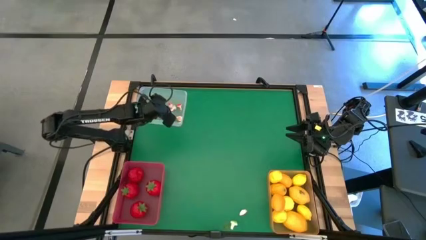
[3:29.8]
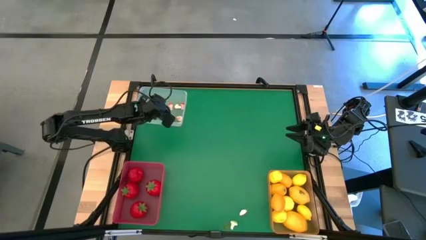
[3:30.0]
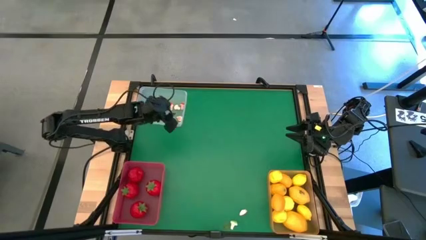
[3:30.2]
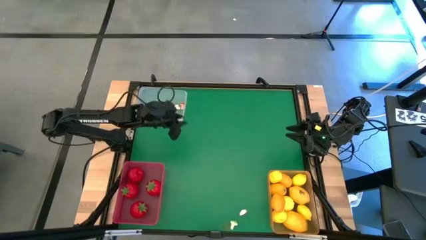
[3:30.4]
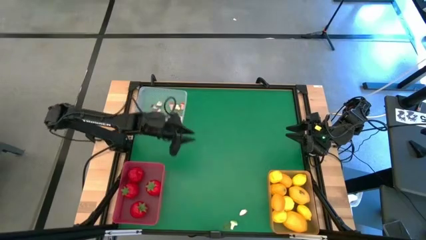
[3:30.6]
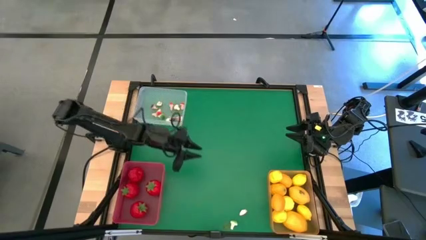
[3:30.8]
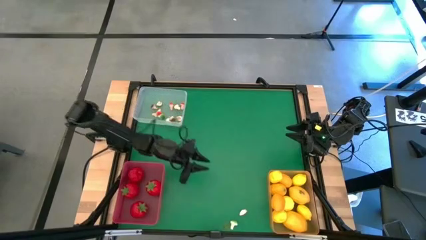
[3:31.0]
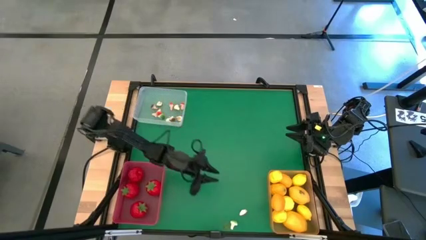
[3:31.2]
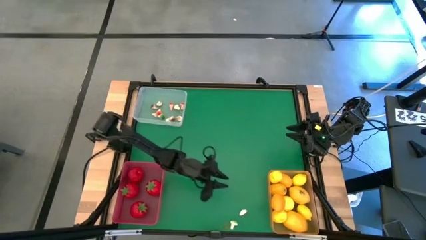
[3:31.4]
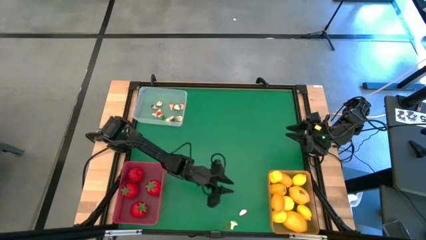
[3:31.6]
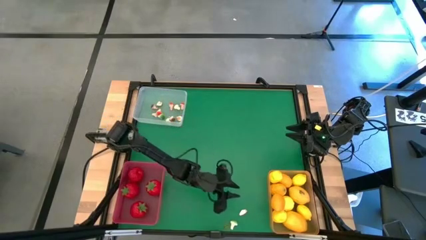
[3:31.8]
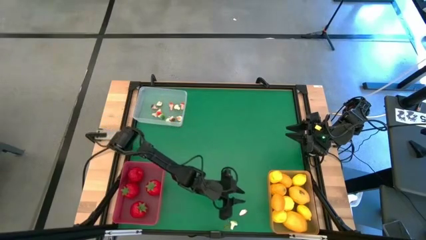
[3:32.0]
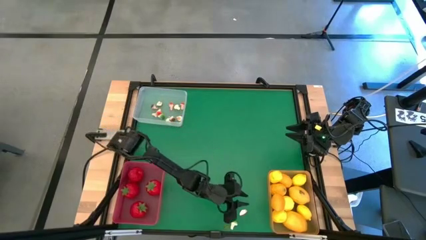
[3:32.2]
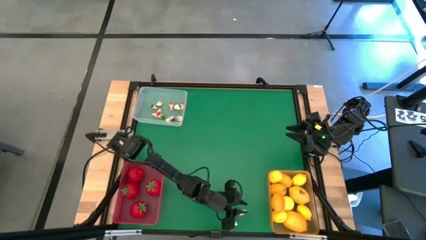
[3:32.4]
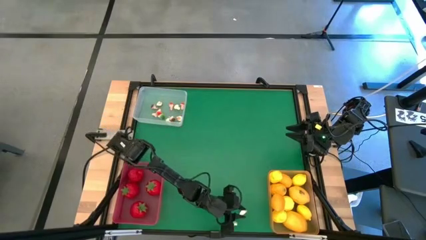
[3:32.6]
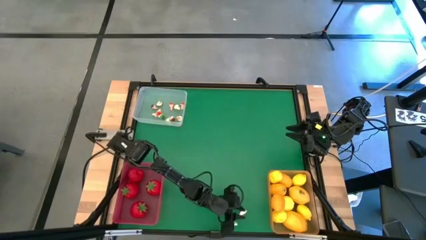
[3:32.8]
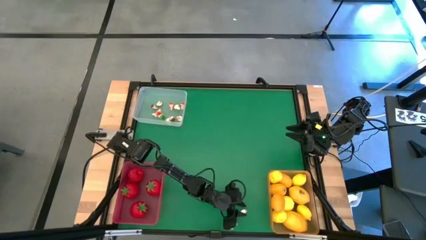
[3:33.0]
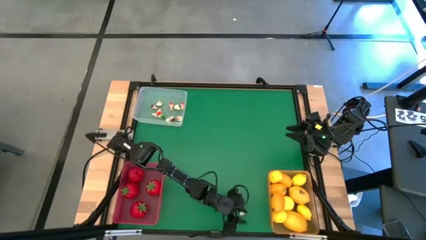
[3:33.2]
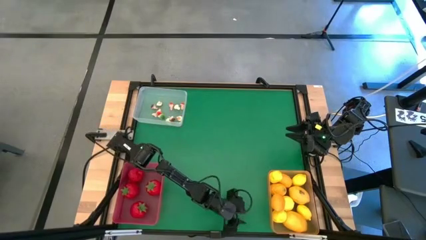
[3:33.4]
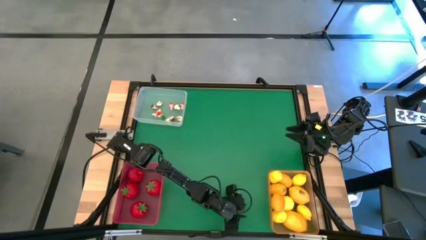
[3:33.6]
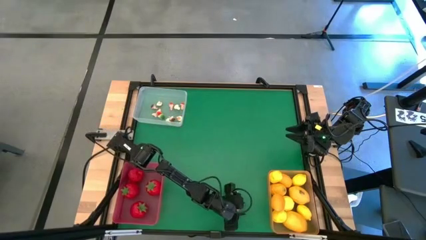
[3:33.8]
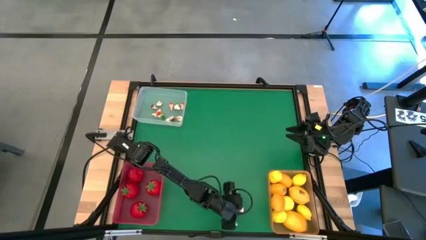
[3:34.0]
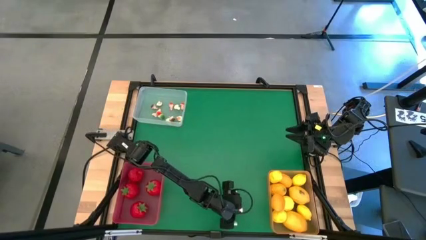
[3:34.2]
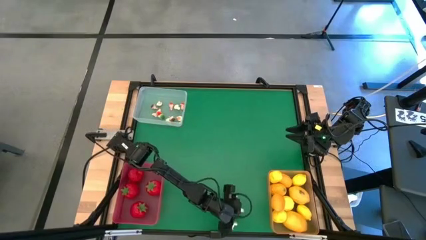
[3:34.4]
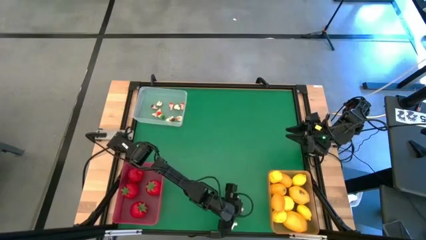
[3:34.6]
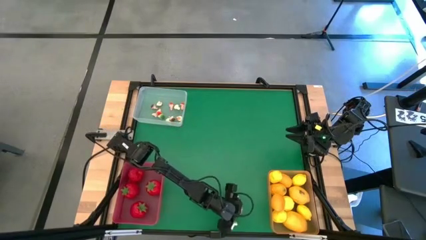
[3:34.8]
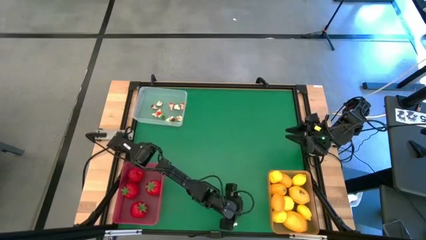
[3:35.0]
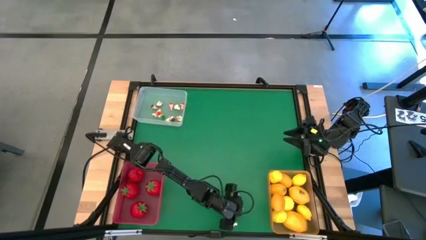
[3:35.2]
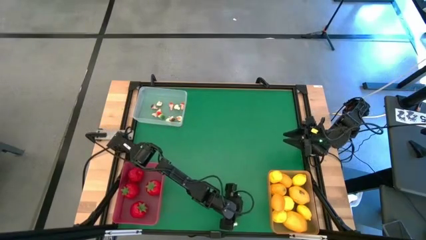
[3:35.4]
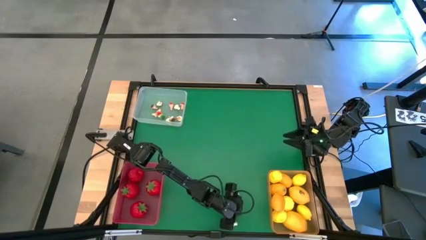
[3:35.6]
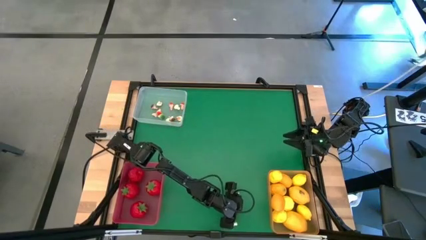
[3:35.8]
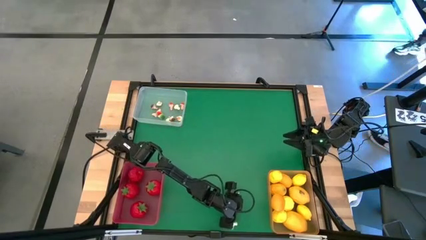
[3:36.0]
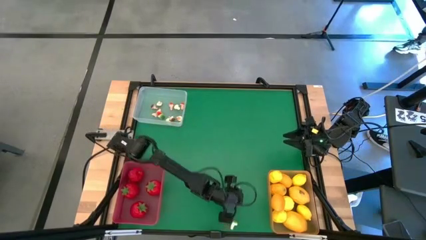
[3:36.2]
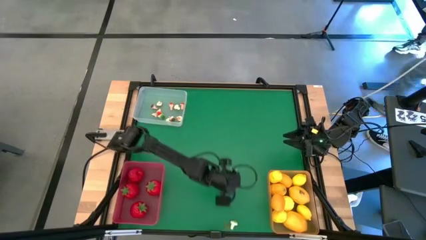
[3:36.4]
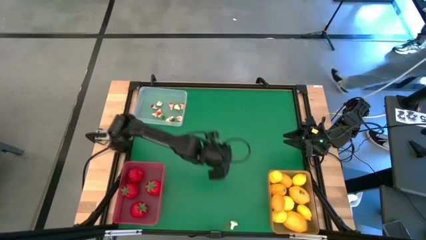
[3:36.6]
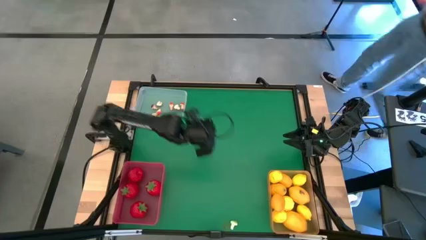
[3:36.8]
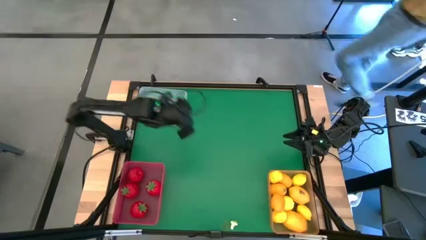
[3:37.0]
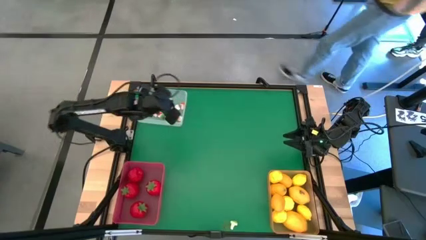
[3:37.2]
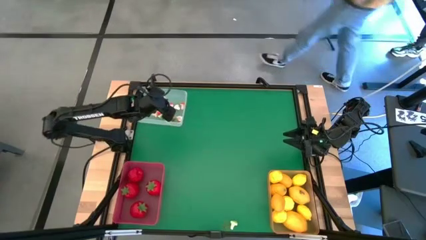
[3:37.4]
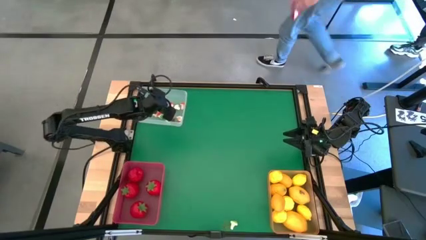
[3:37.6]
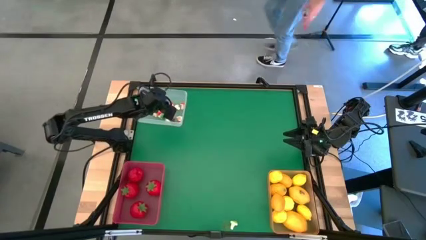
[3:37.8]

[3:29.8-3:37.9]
Task: Sort produce into baskets
Put the red mushroom into the white bin

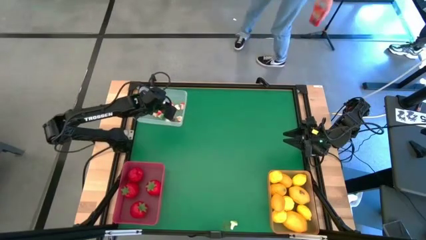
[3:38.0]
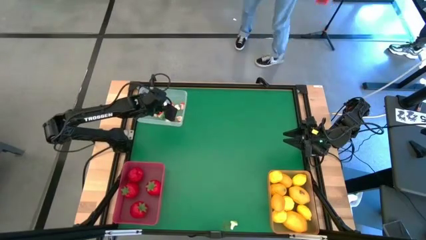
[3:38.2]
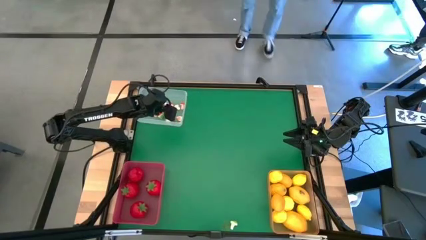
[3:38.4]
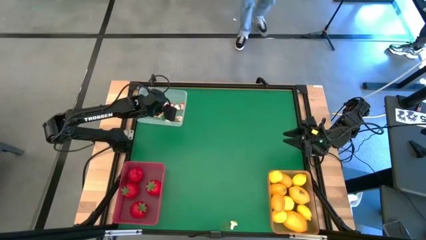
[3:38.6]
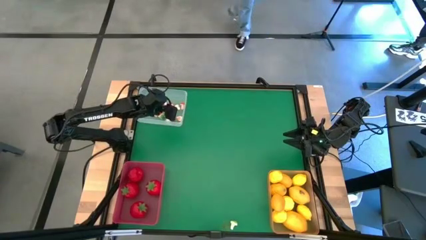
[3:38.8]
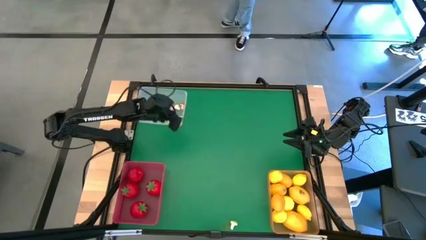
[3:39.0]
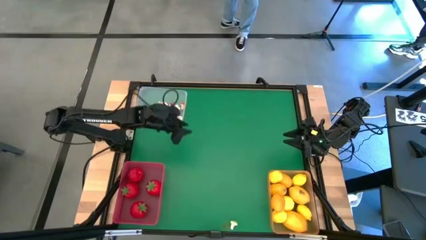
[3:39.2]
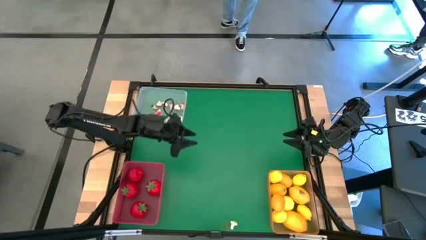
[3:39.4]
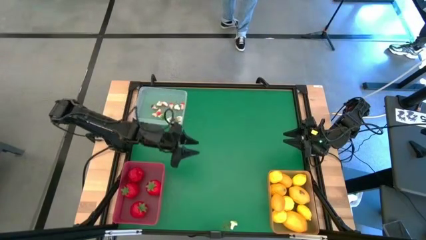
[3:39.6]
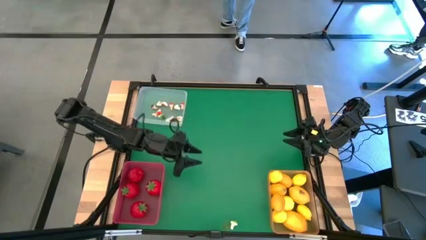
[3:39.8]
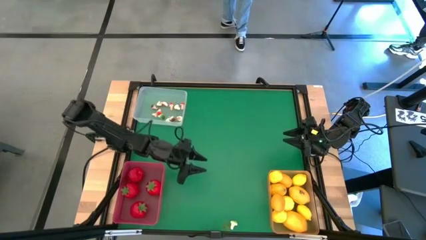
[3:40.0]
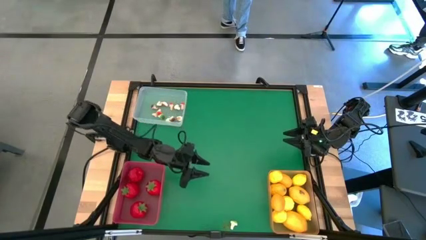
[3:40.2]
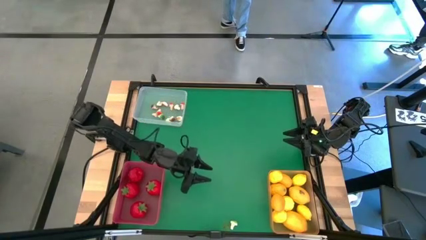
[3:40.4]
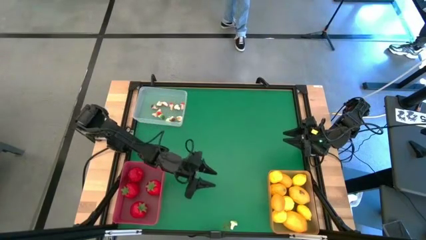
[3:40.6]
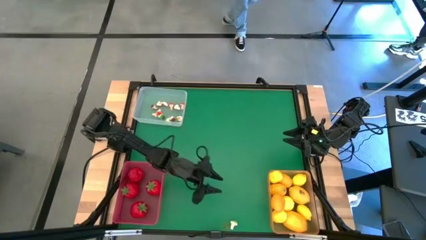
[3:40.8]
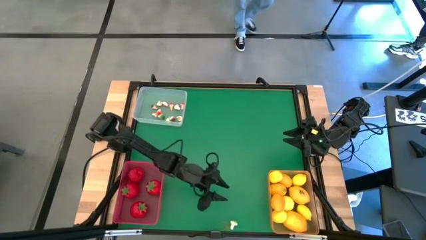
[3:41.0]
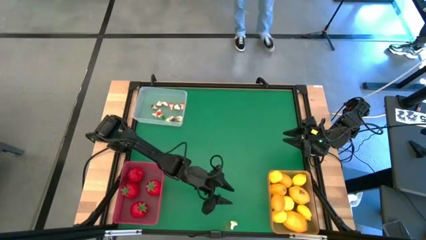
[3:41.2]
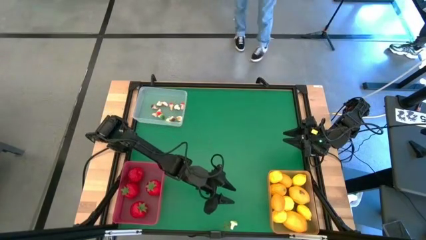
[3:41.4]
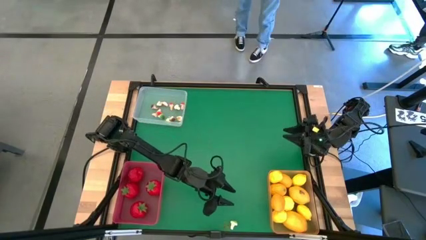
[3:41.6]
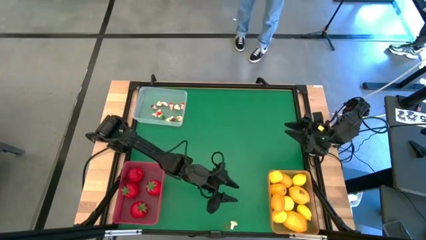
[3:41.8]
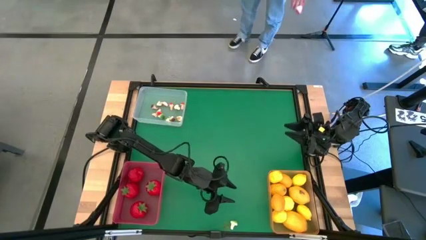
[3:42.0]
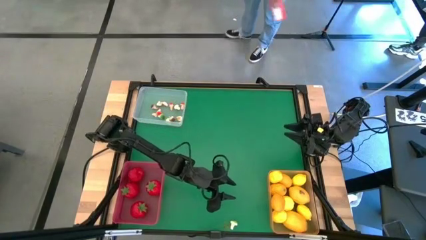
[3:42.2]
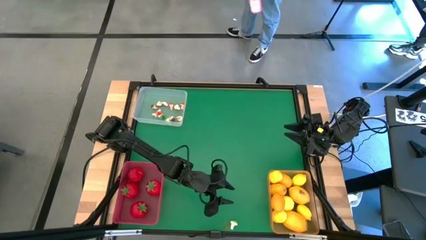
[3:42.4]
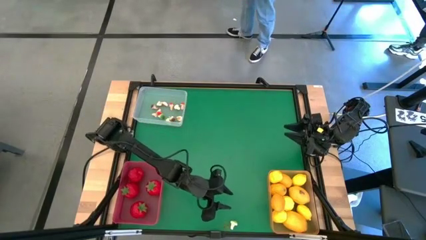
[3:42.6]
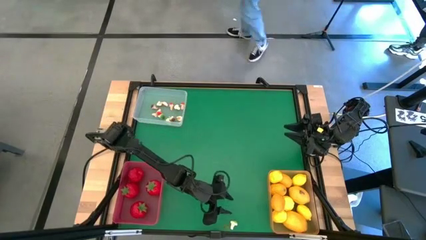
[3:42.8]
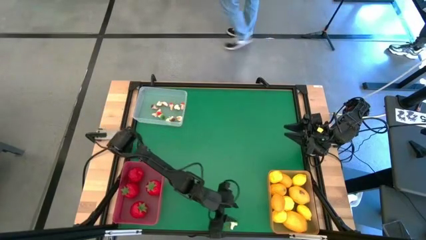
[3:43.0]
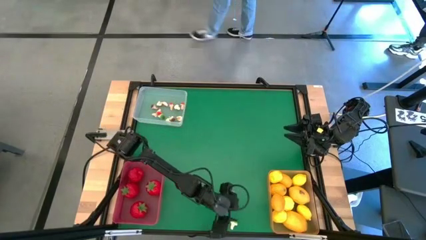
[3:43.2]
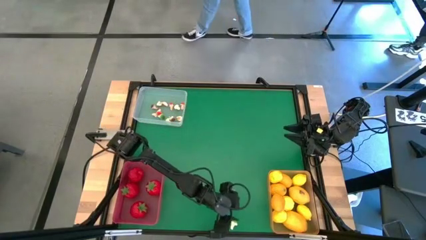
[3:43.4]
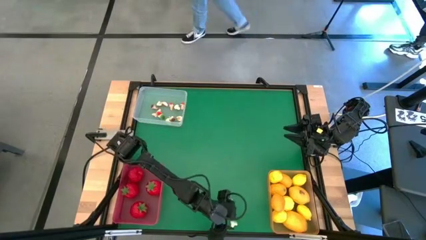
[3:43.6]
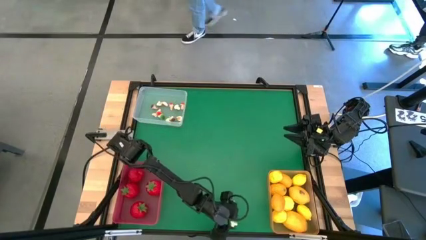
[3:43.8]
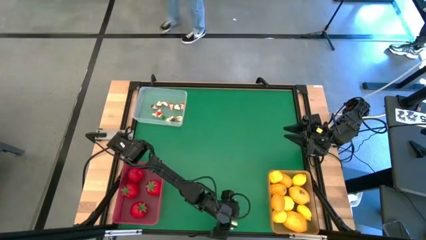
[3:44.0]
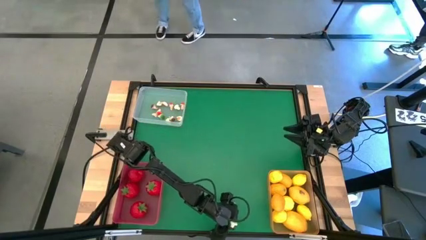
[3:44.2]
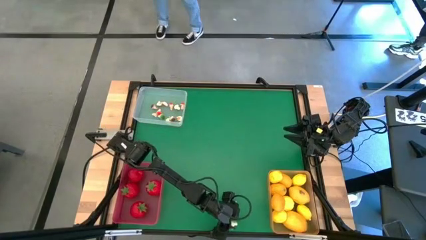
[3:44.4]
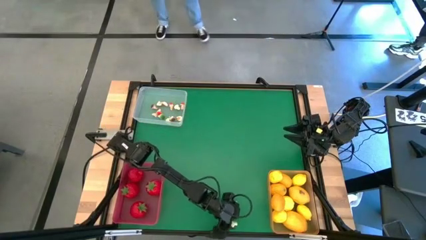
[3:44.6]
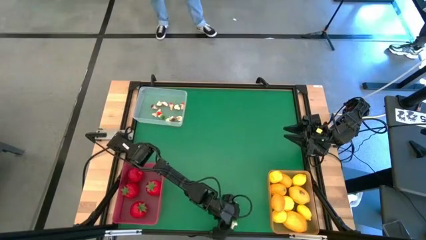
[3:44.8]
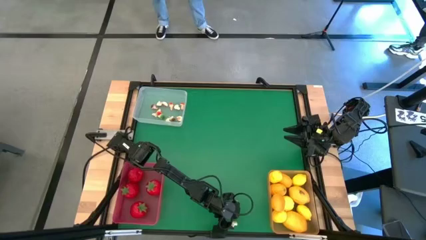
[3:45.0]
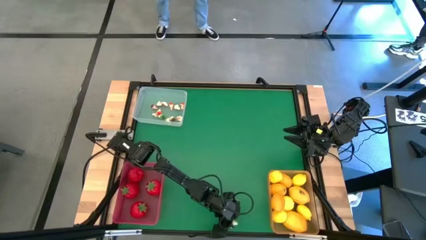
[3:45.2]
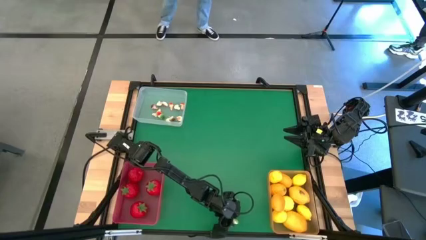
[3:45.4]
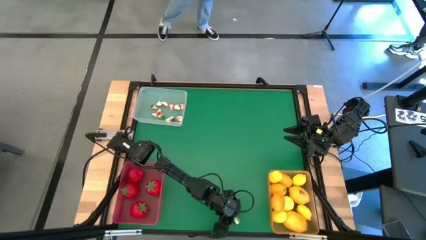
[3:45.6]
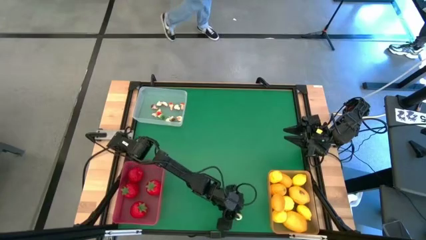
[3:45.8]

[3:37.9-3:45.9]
Put the green mushroom into the white bin
